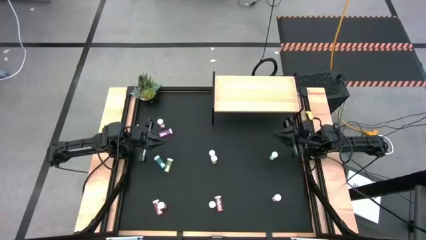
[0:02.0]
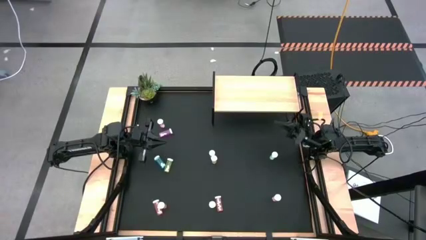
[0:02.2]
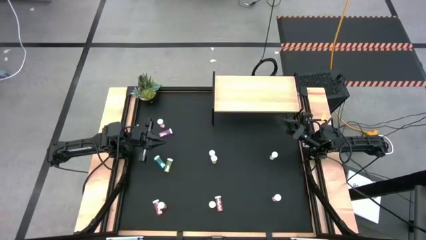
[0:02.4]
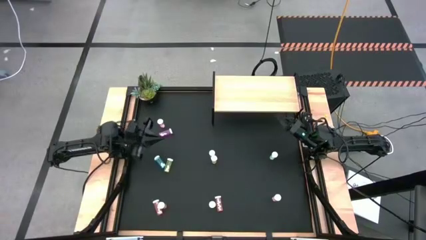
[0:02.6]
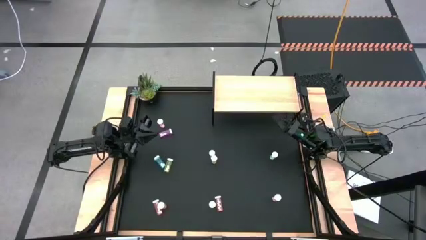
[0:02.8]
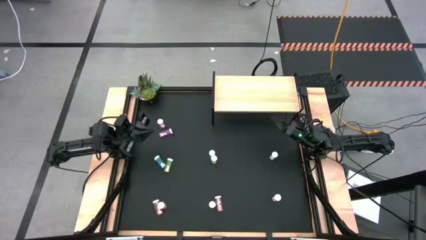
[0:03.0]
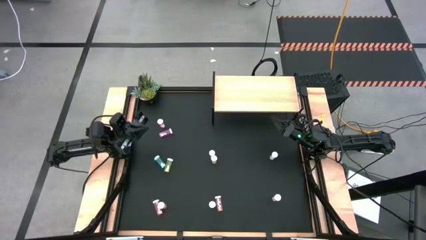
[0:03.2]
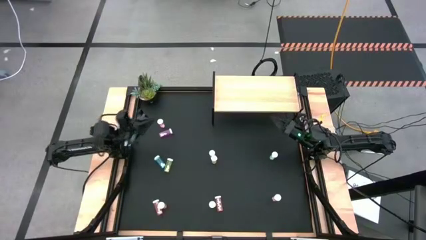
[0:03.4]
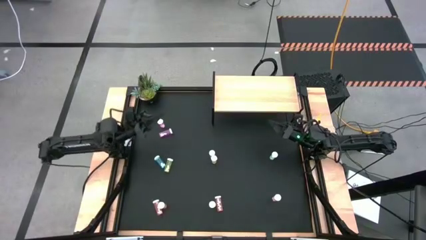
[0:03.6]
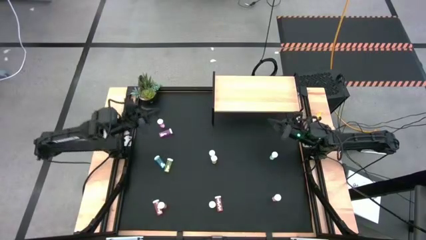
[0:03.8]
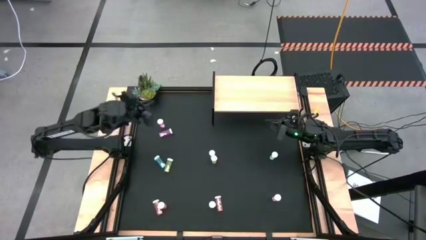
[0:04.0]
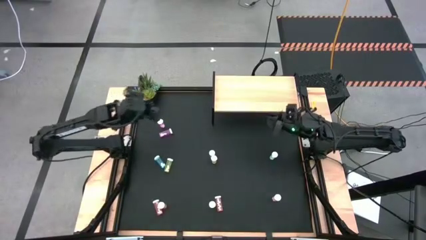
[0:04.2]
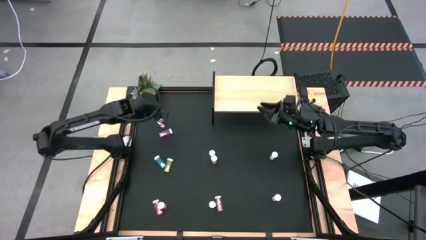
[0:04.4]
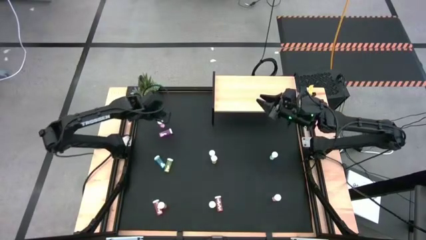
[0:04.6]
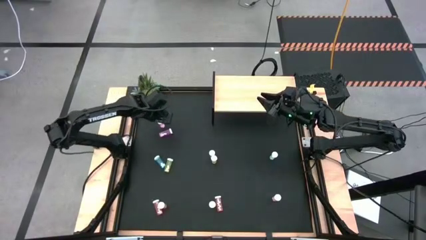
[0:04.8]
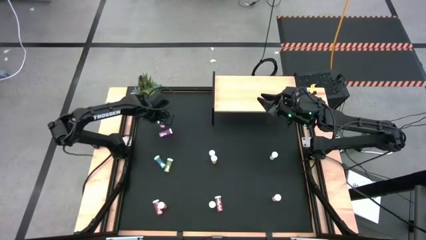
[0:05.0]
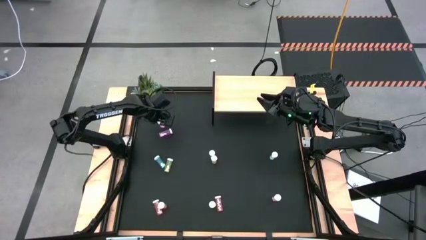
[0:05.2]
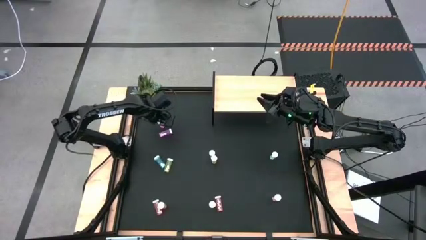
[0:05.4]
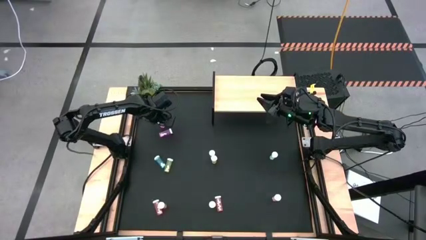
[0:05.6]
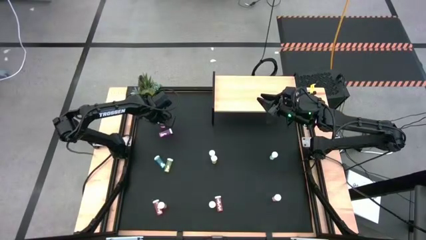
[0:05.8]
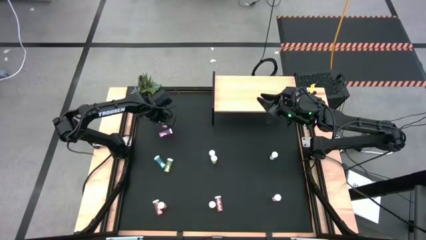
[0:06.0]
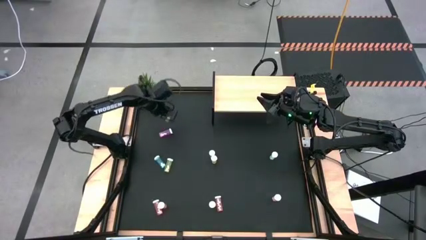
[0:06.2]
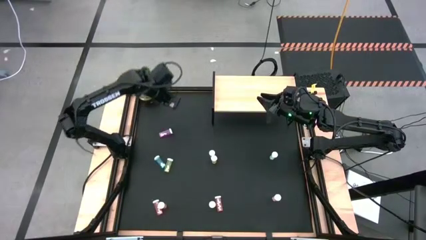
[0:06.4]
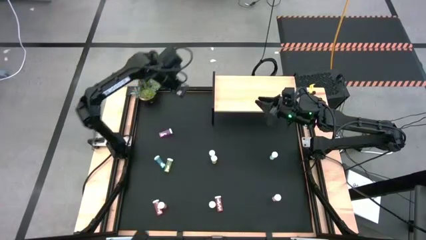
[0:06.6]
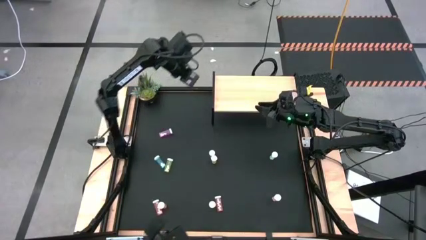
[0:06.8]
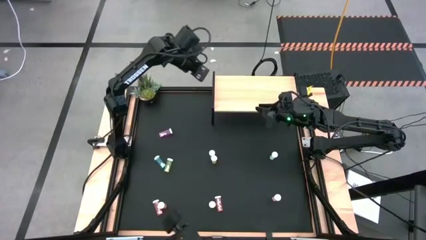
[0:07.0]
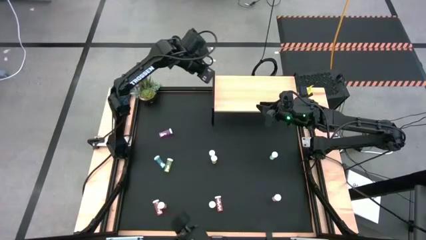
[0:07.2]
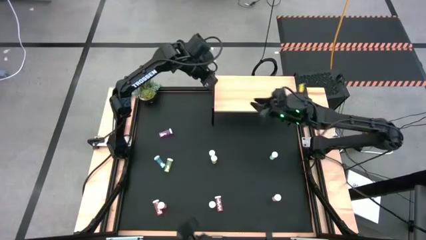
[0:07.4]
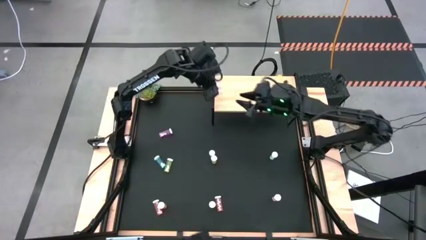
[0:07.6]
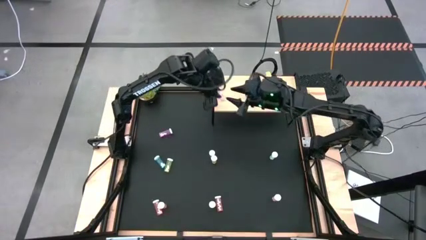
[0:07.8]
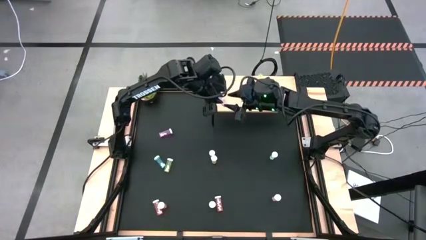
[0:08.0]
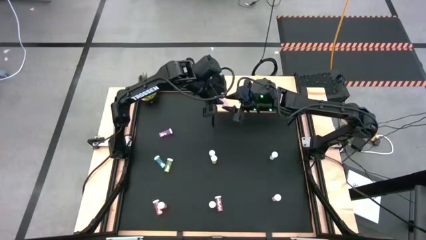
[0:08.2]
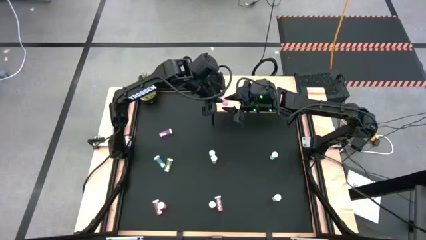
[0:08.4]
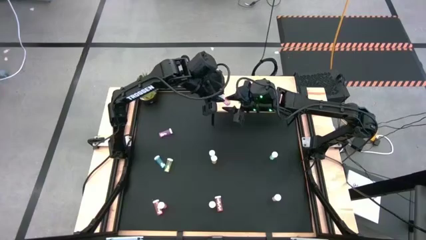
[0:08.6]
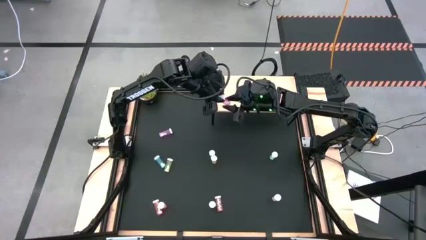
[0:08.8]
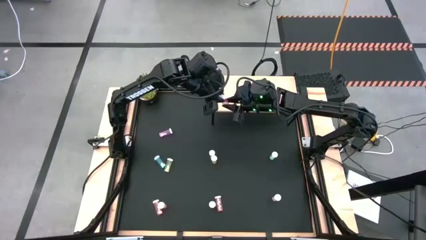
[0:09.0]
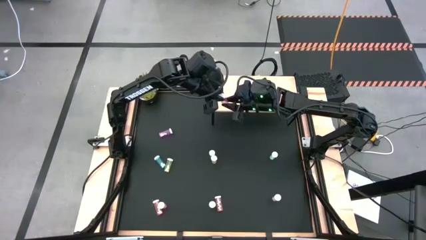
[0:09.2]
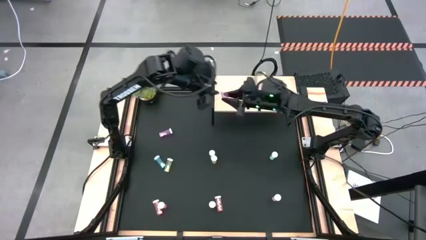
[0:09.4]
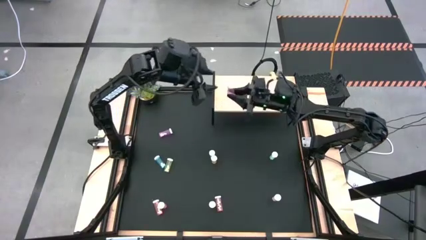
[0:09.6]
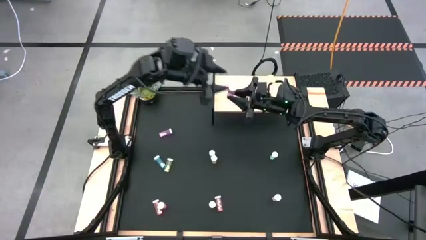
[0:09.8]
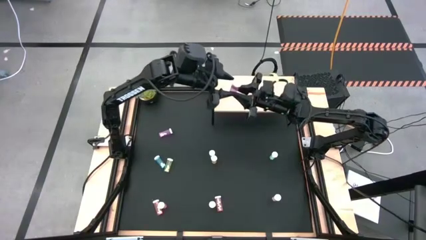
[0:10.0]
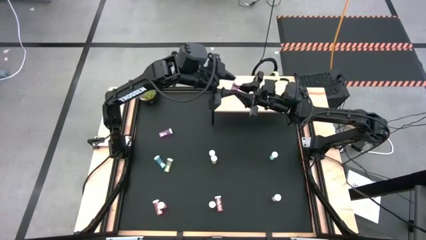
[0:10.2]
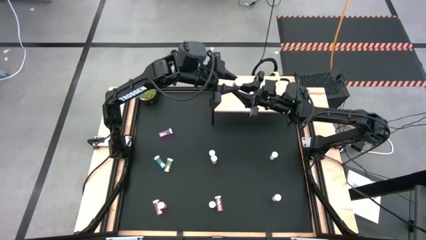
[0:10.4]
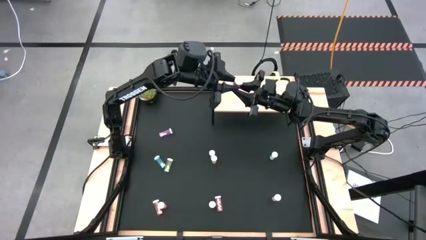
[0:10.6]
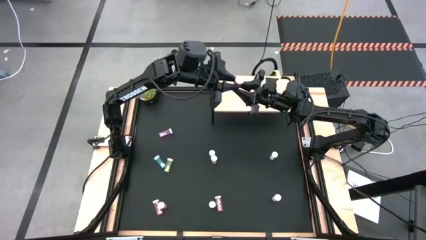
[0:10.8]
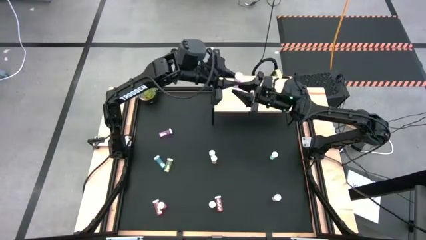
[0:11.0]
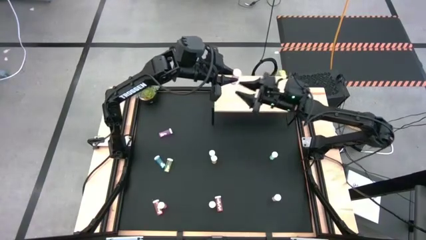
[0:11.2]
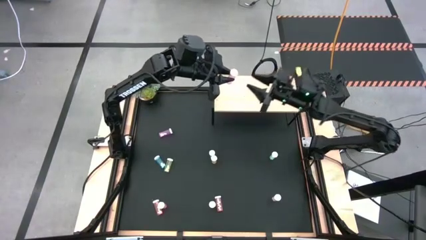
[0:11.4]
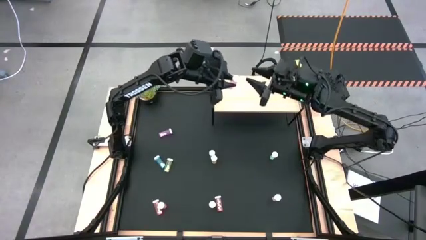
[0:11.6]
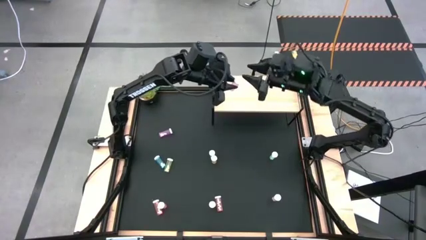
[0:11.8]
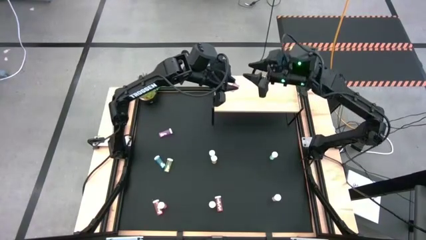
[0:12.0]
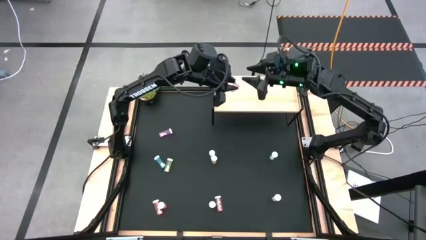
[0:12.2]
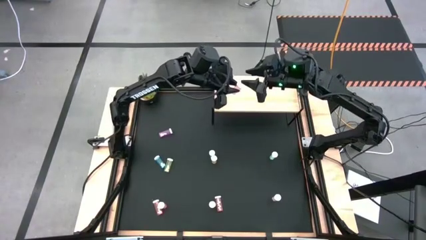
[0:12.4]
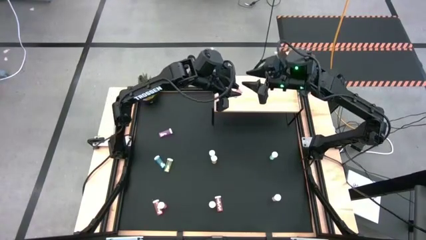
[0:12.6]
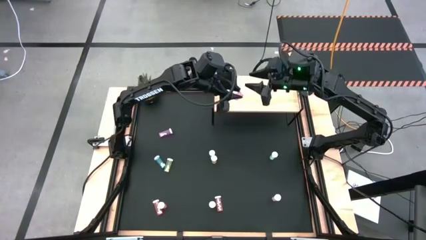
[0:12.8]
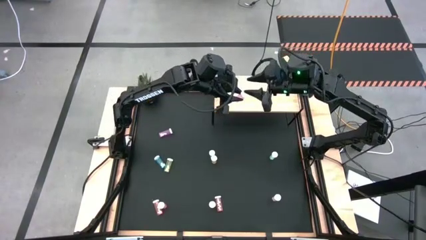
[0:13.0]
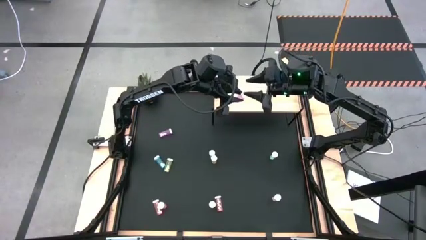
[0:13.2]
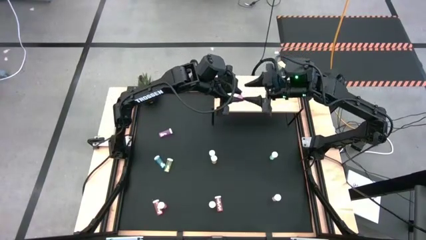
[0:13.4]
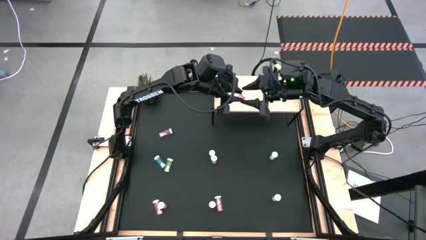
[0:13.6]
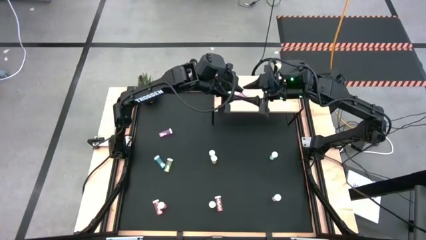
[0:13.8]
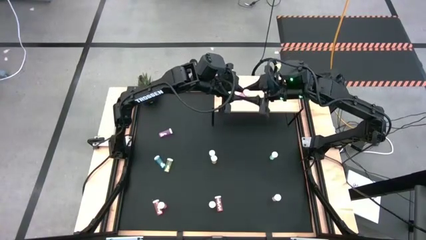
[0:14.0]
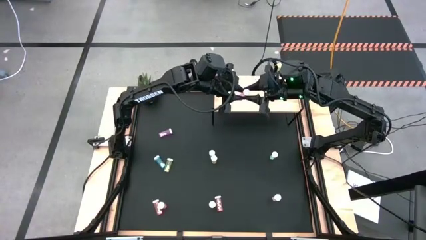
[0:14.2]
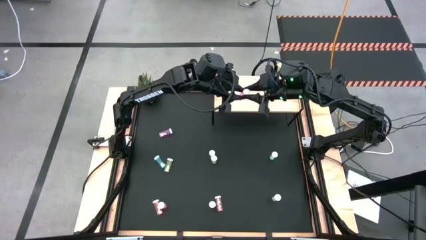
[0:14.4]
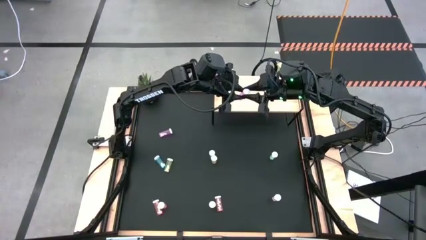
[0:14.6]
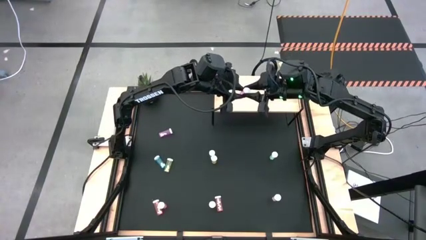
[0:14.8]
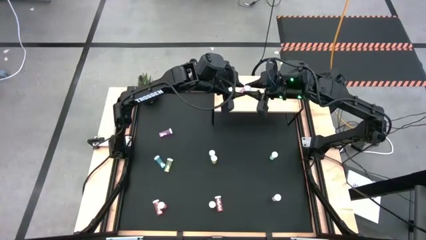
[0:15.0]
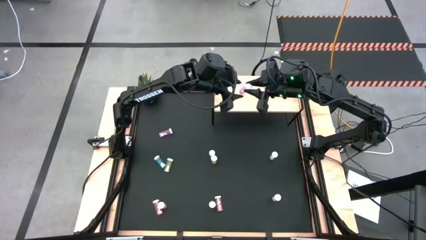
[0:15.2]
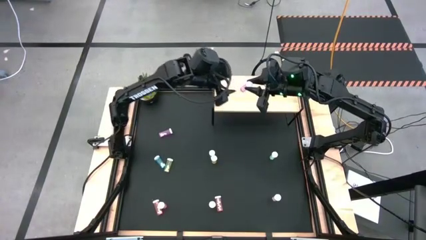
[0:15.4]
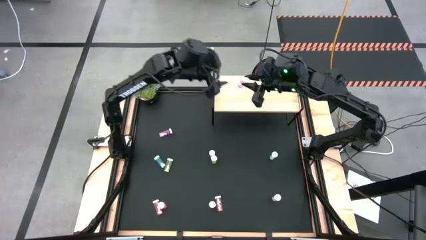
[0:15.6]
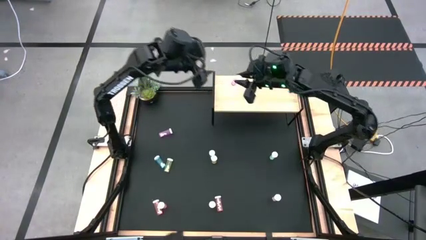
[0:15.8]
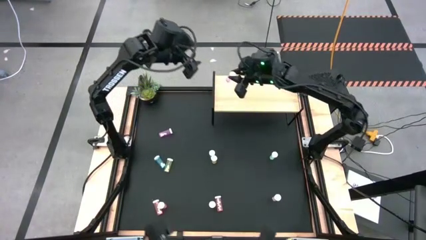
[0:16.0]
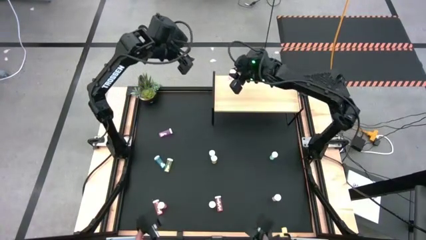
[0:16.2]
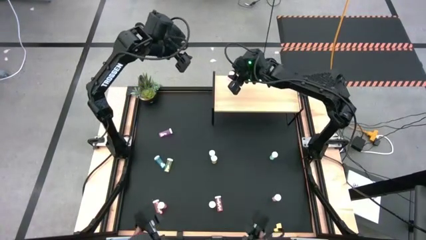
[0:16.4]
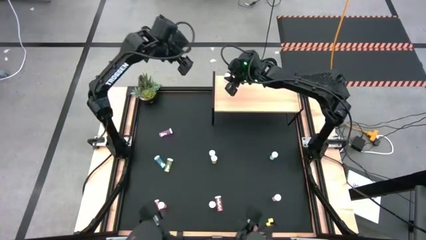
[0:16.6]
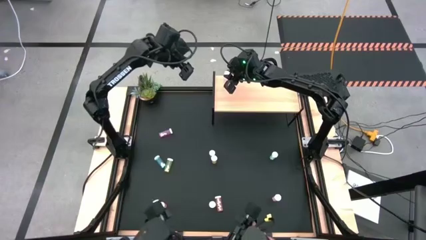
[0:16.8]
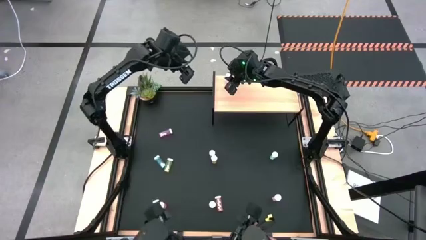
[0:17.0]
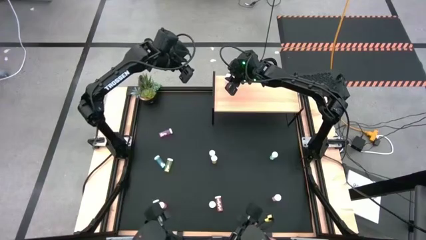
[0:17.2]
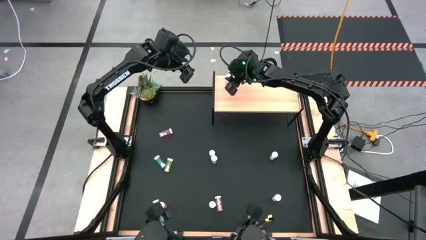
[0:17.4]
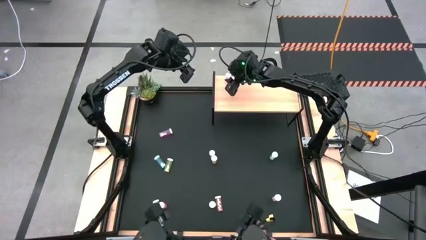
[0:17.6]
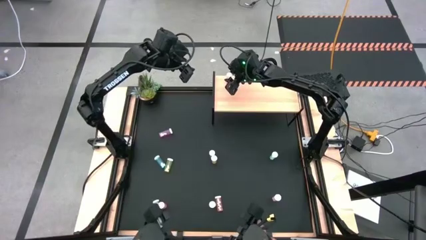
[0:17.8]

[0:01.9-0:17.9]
Task: Pick and place medicine bottles onto shelf by color
Put the top left violet pill bottle on the shelf
